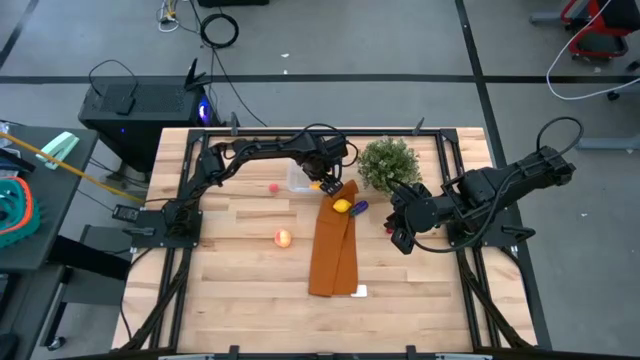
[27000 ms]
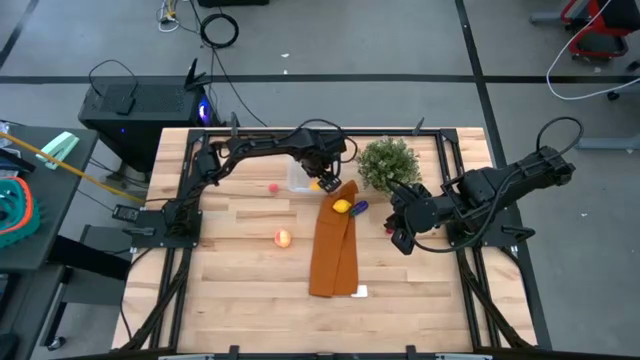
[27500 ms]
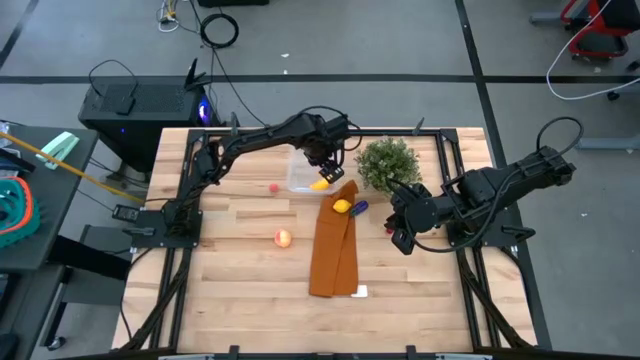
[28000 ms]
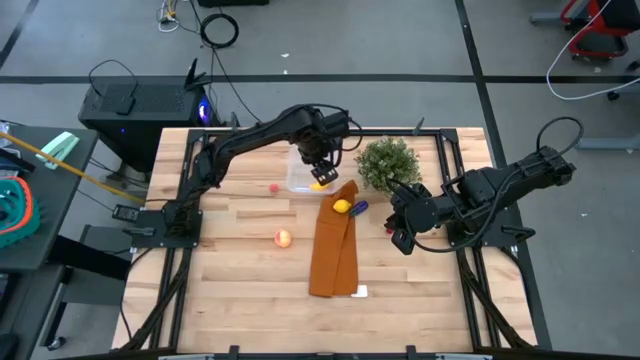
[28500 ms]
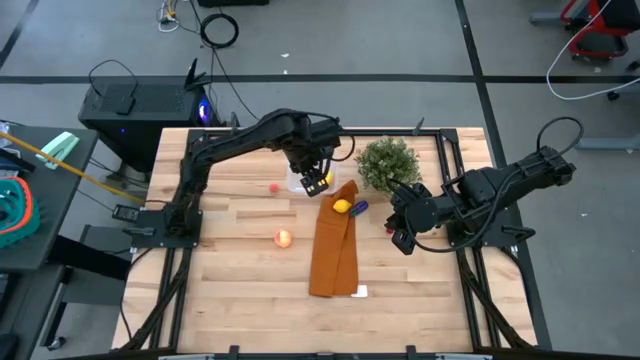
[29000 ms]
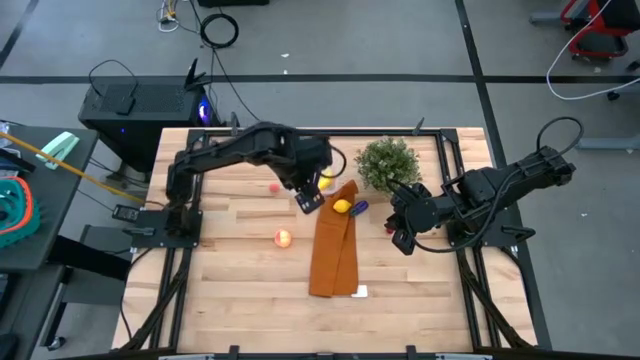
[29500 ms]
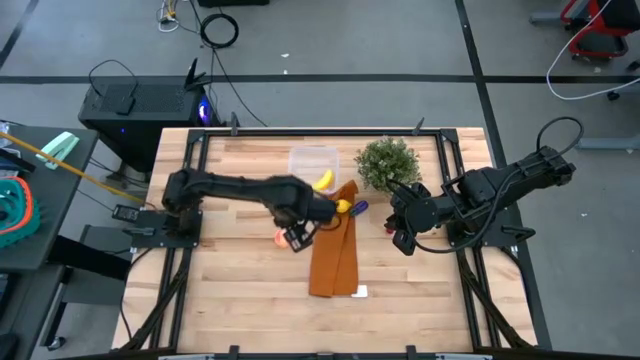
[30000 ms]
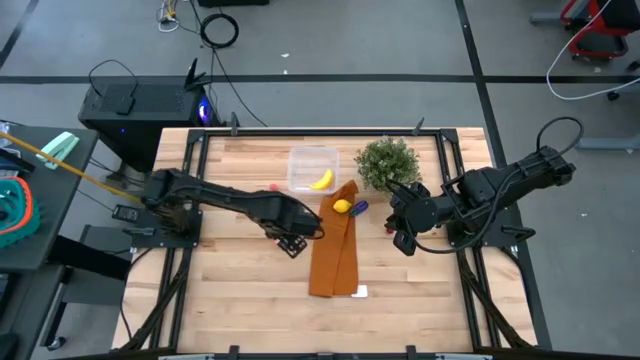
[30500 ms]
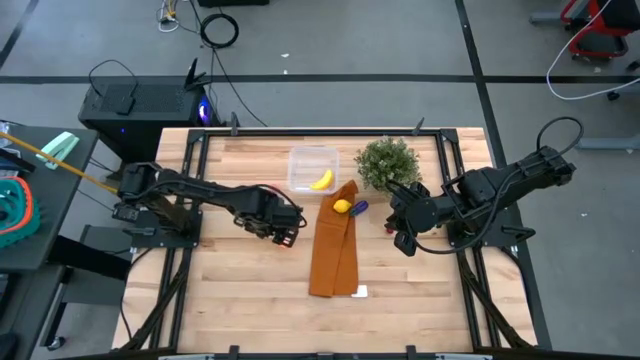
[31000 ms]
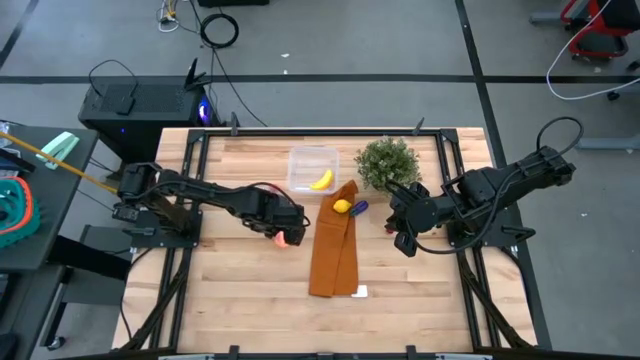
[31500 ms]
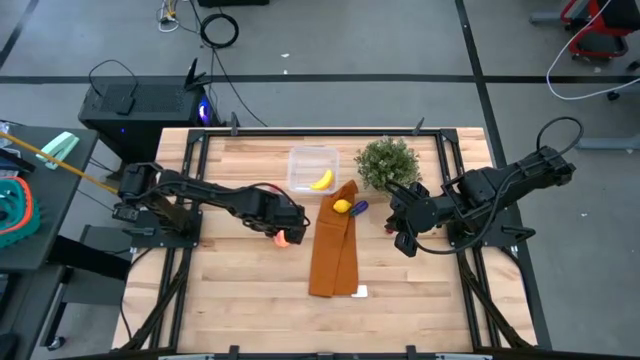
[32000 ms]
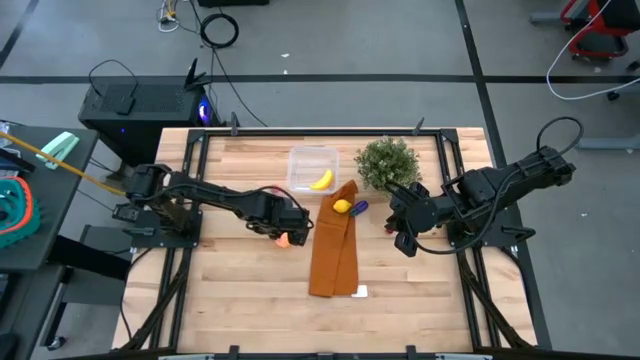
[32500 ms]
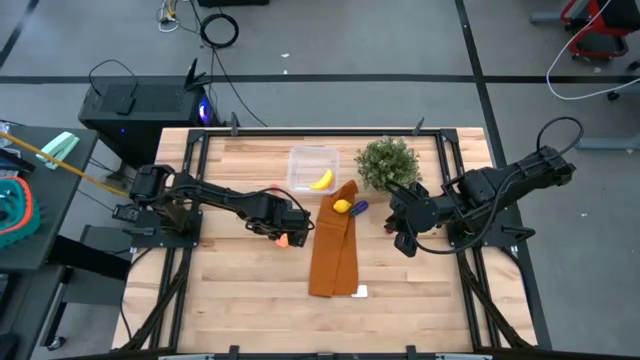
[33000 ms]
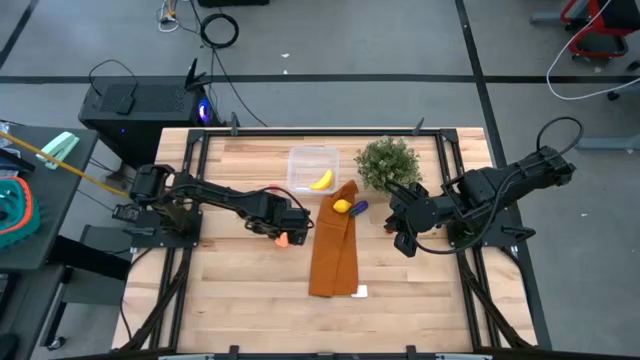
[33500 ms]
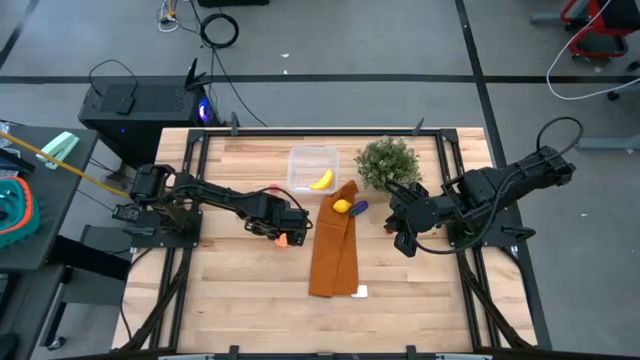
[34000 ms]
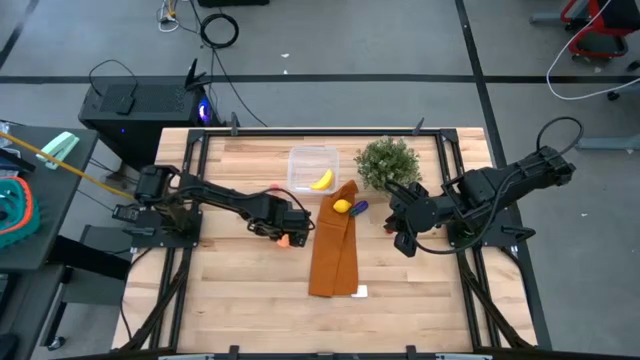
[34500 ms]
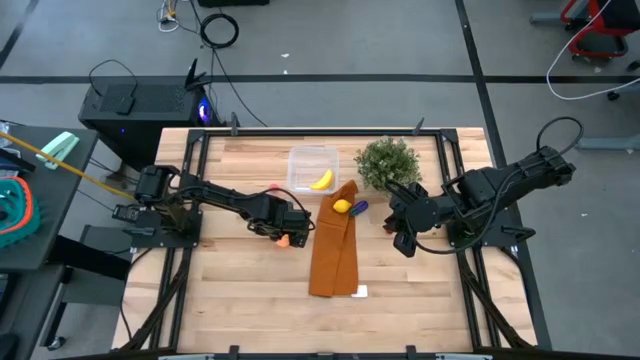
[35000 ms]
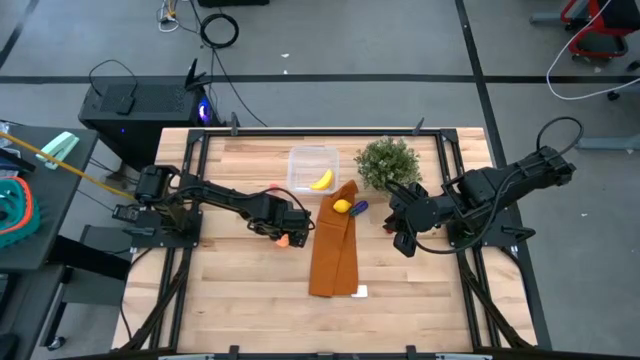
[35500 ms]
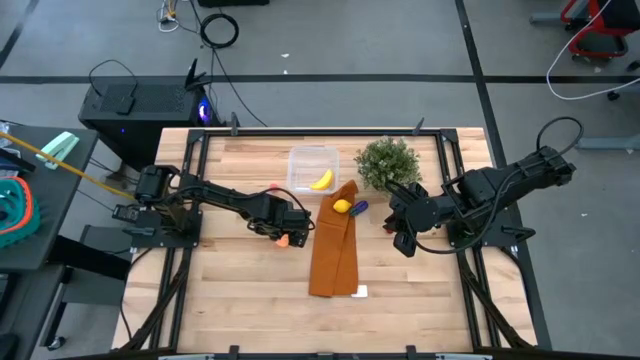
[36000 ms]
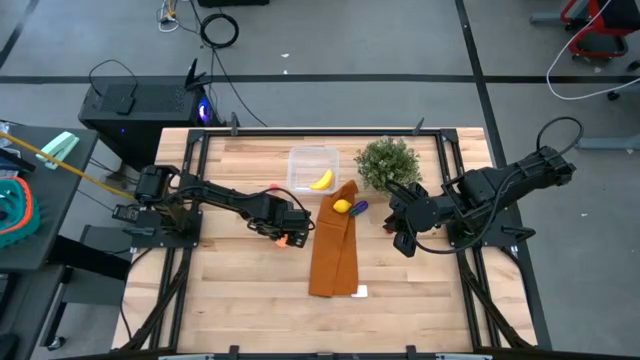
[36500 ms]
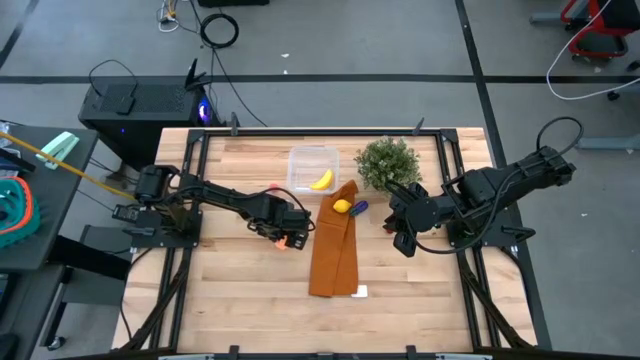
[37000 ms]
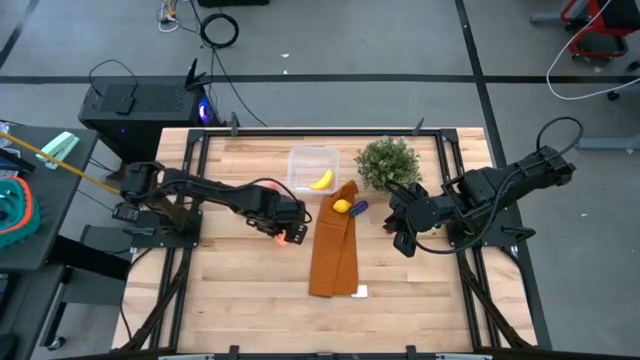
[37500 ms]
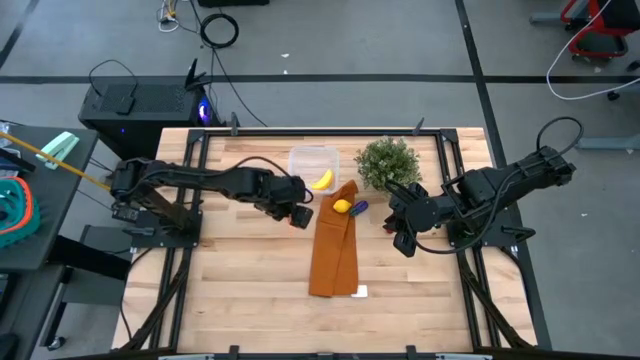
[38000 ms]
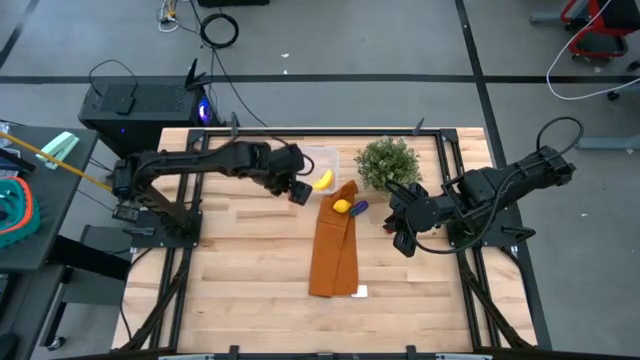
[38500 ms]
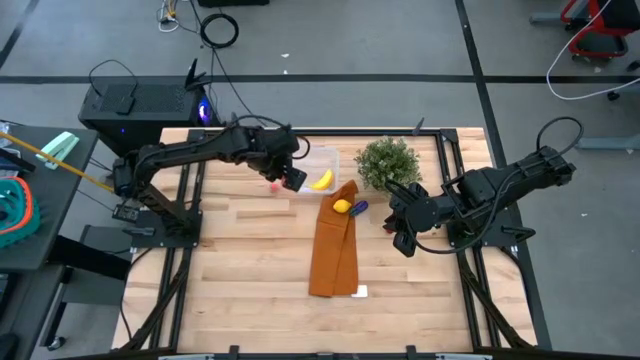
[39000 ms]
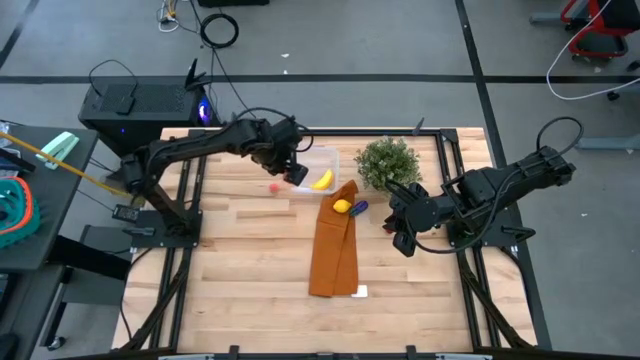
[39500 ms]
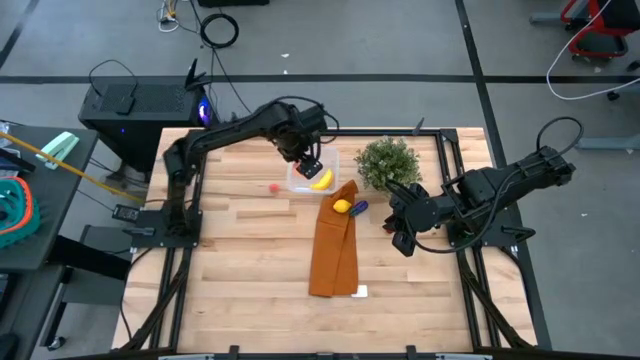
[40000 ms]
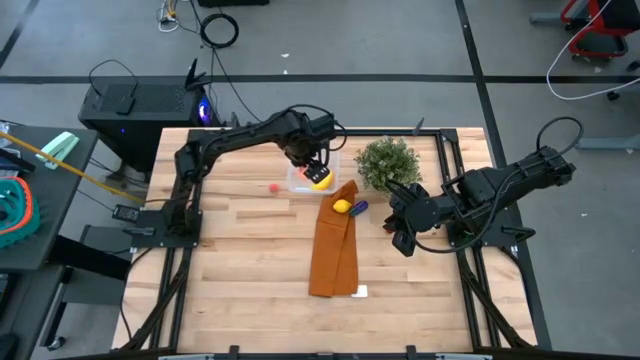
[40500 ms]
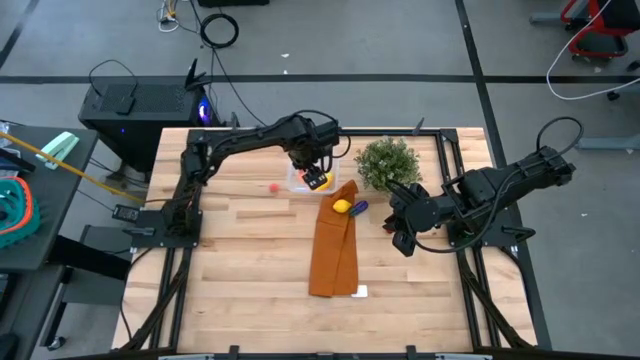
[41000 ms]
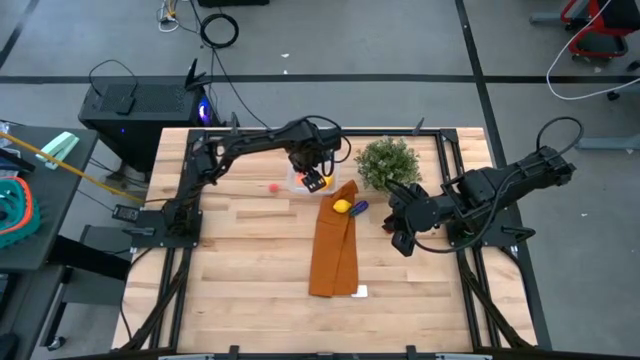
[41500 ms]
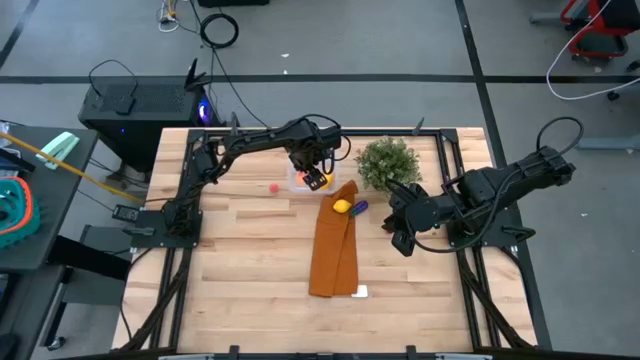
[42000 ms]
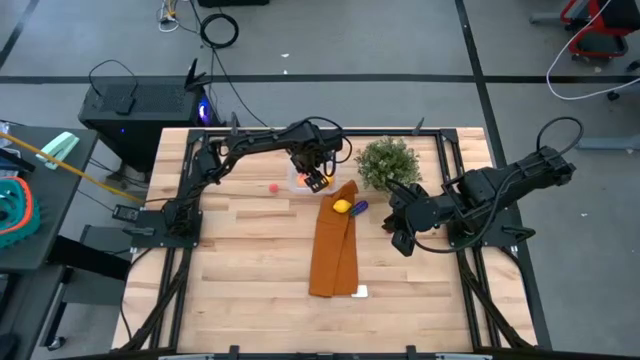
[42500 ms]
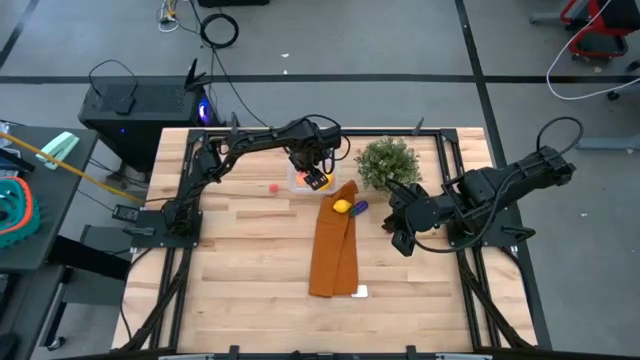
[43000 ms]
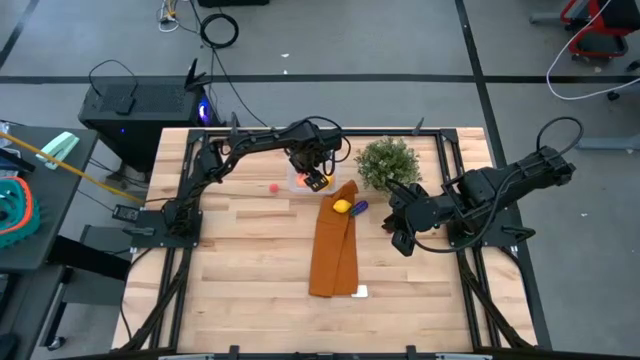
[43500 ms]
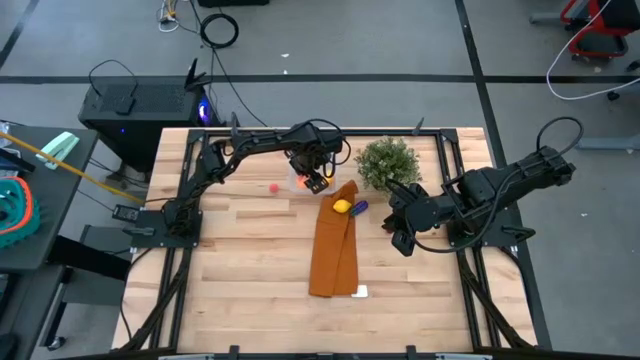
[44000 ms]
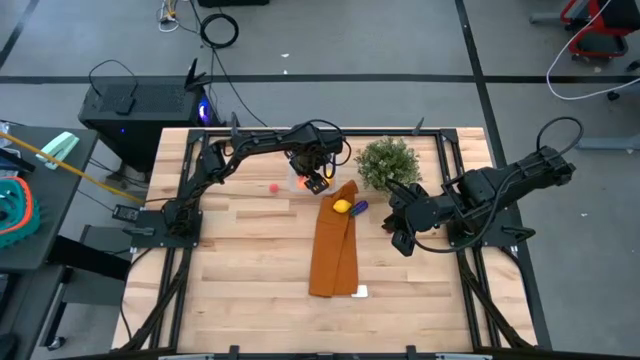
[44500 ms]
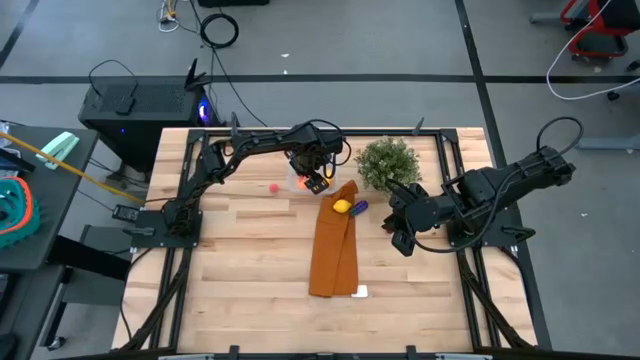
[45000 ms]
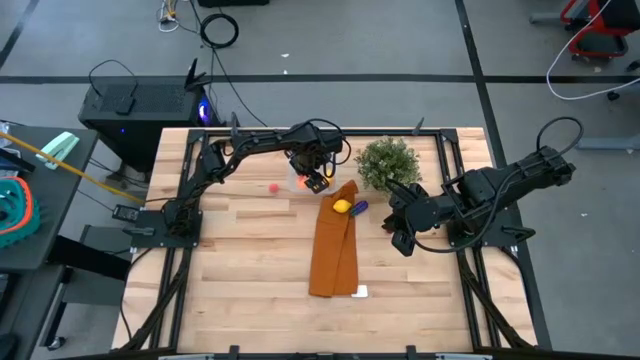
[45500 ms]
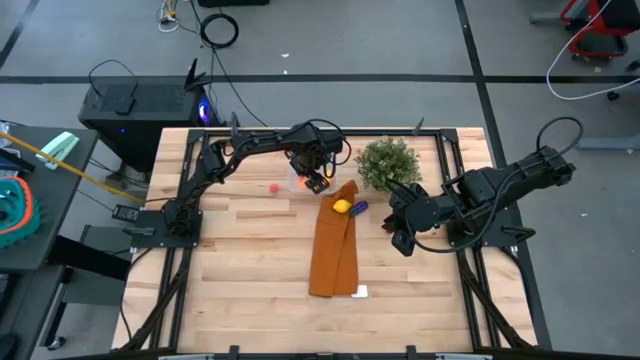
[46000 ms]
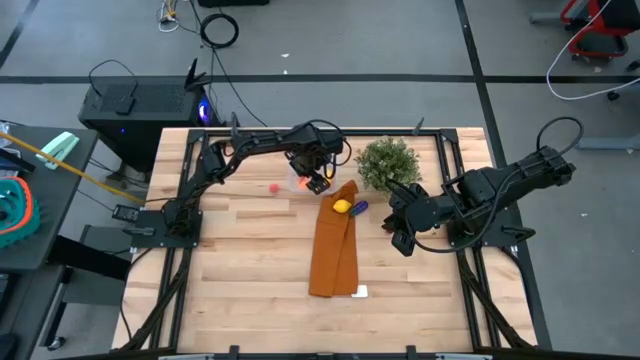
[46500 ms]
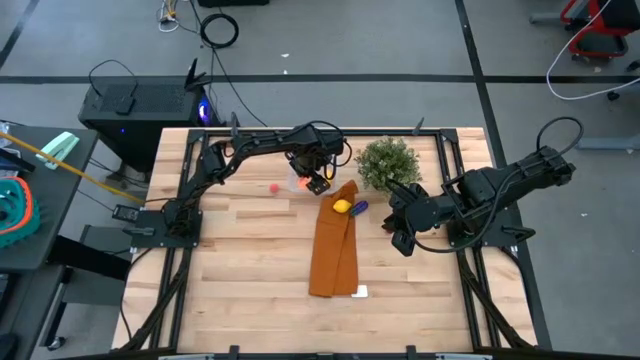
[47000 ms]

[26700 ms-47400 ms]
Task: Pick and placing Produce into tupperware
Put the light orange peach into the transparent bin
